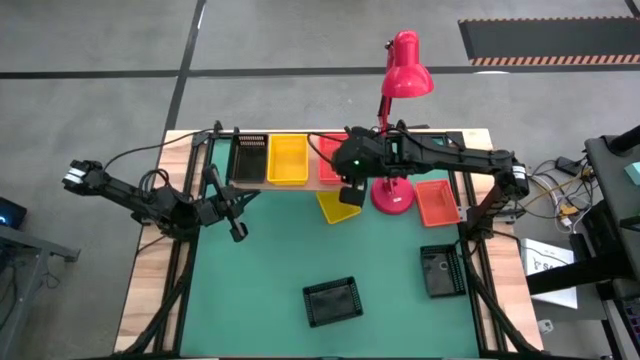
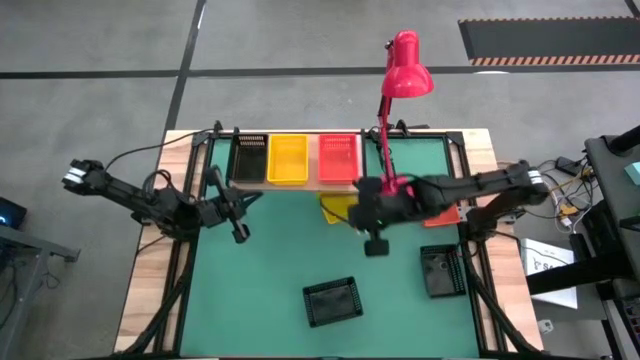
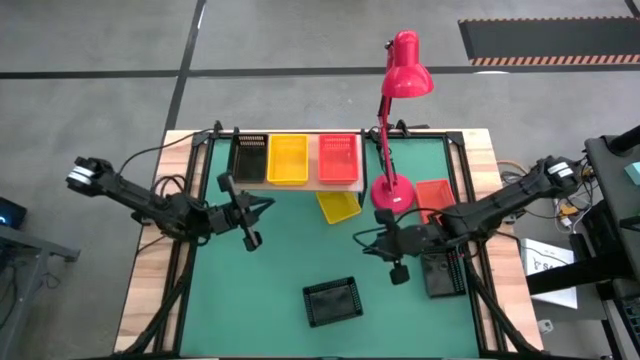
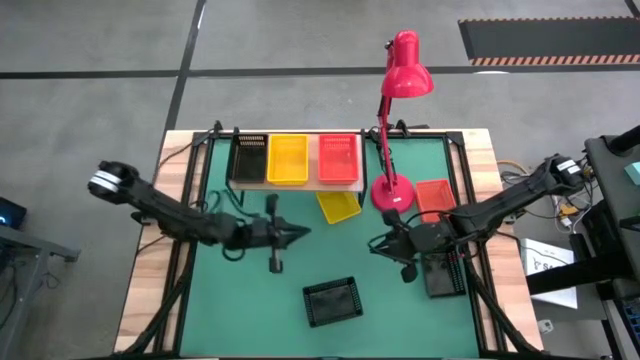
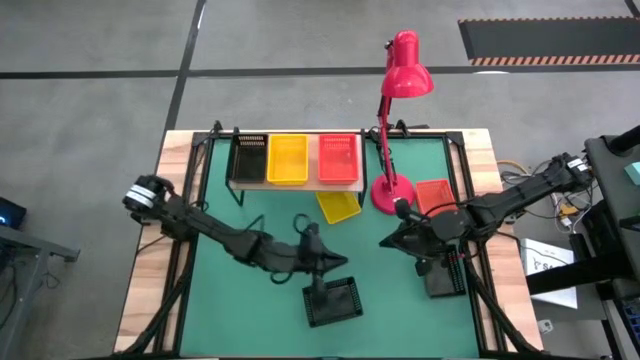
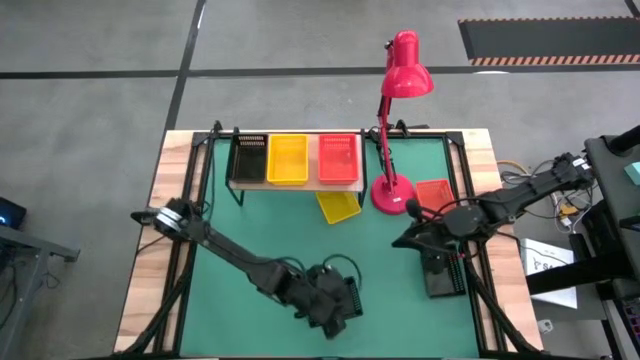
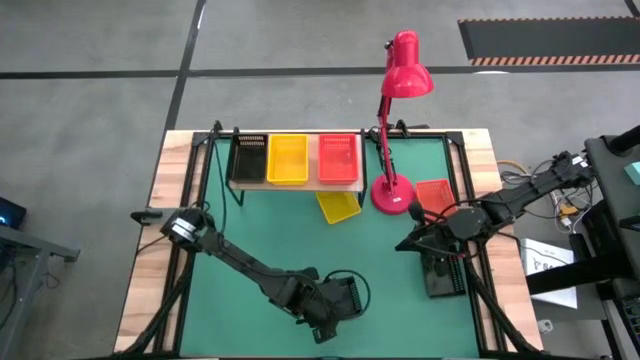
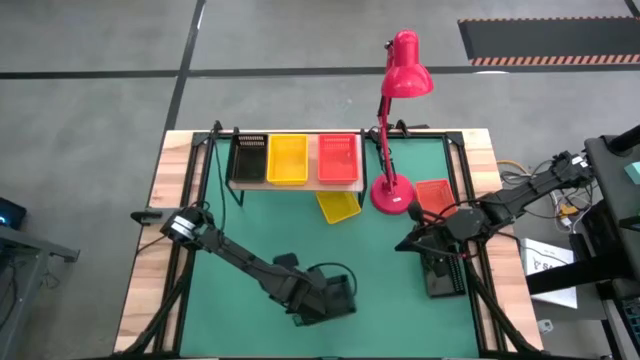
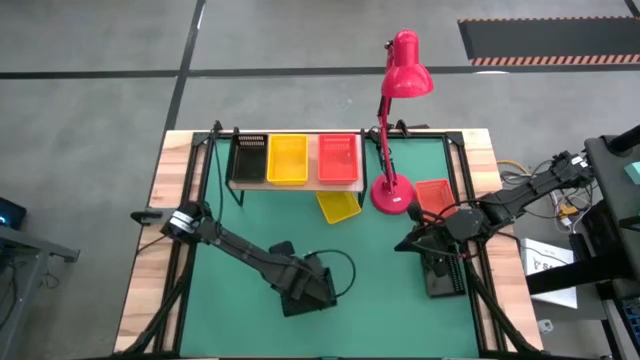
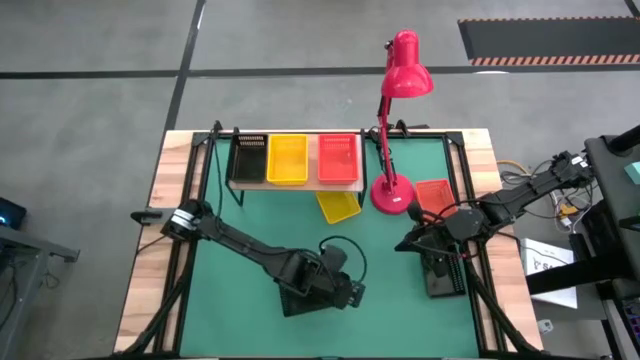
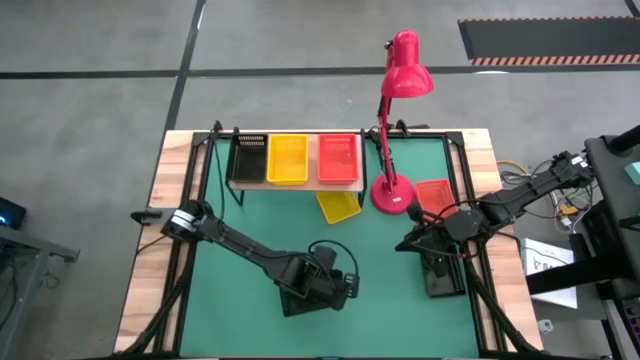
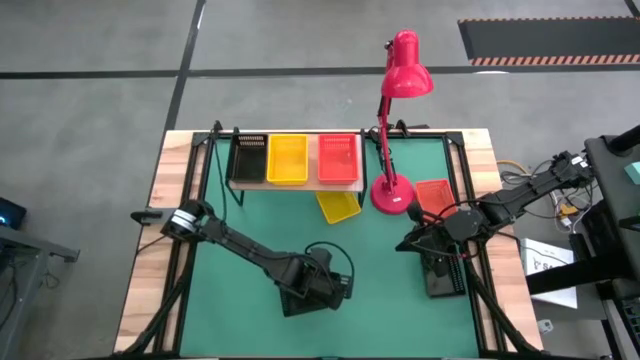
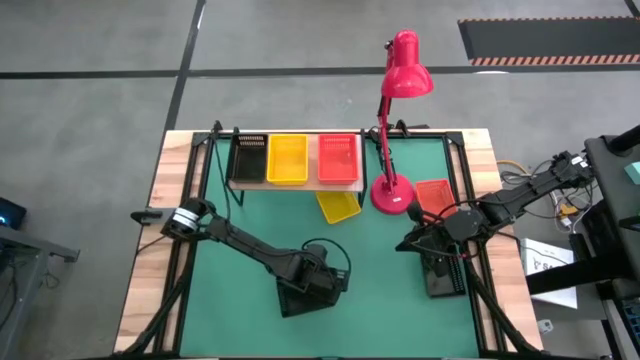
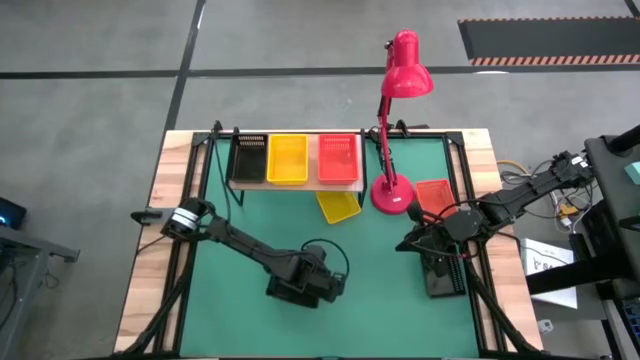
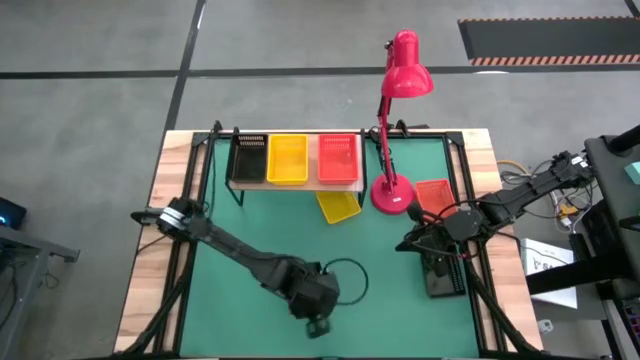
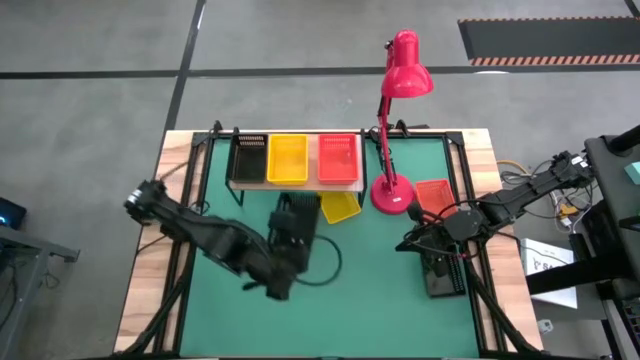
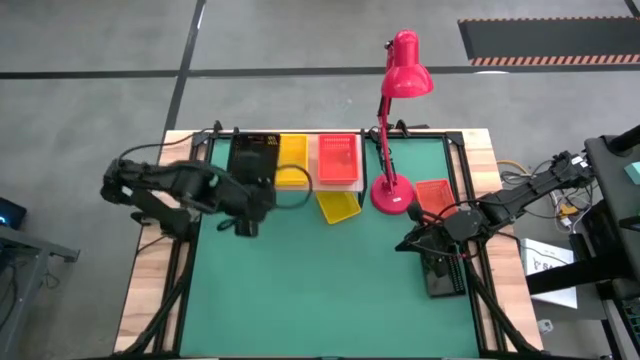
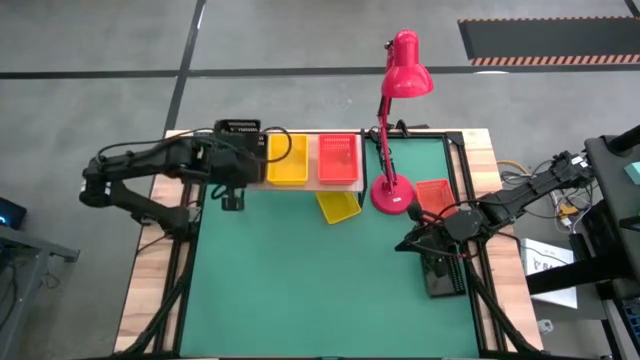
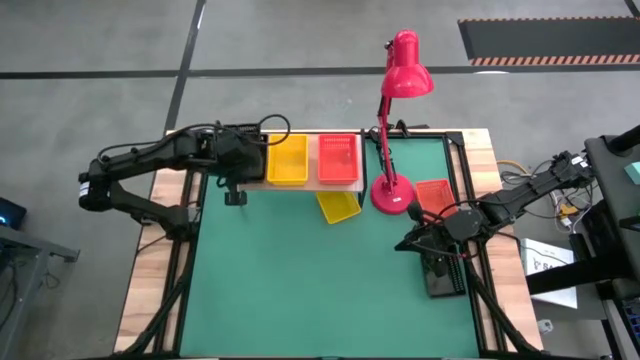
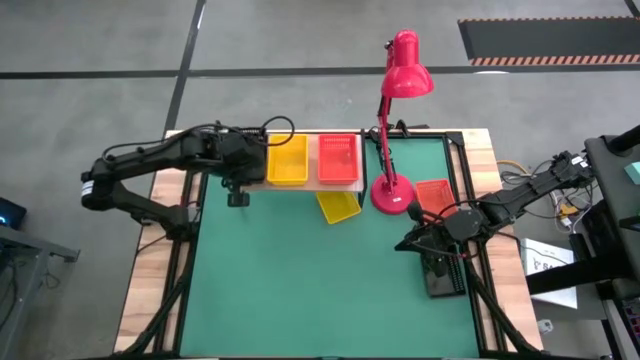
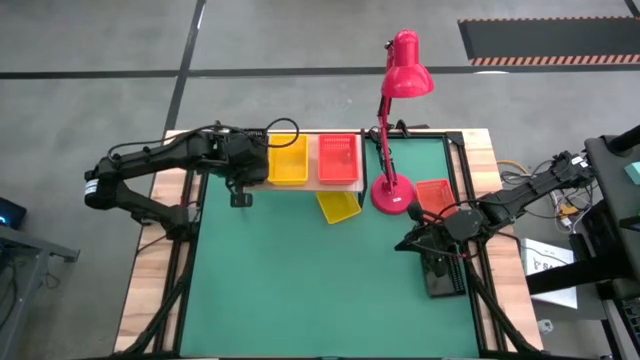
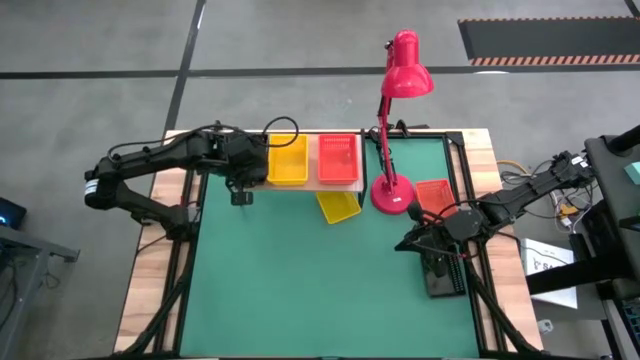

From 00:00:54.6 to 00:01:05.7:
Task: Stack baskets on shelf by color
Stack the bottom black bin on top of the black bin on the shelf

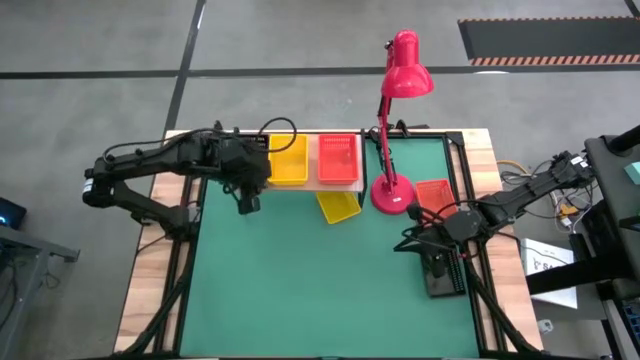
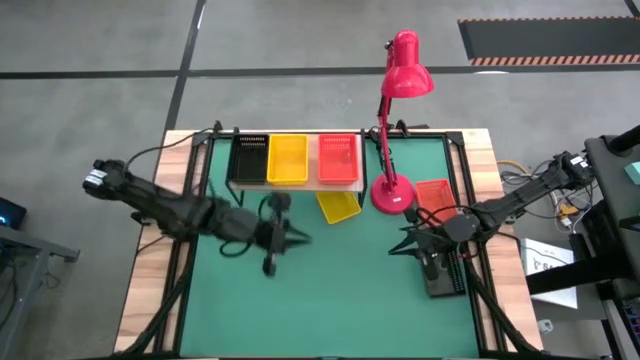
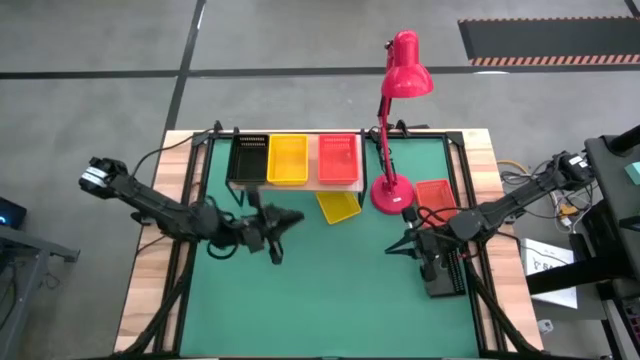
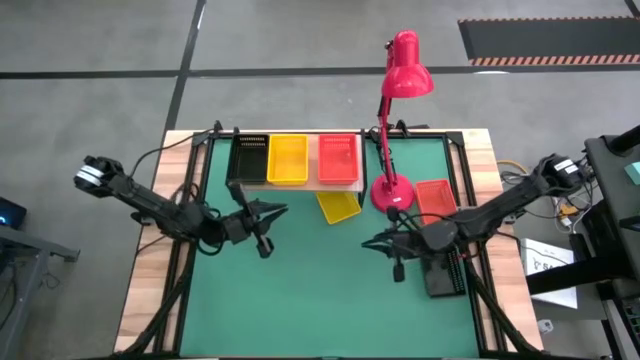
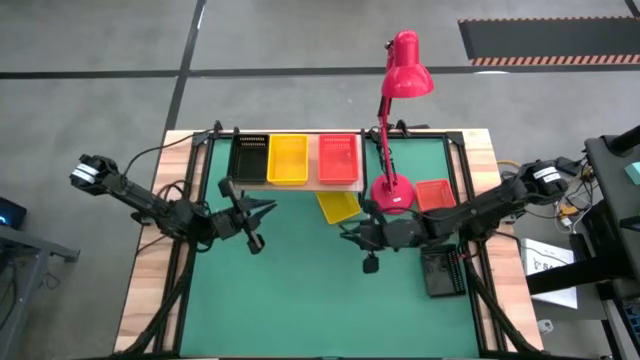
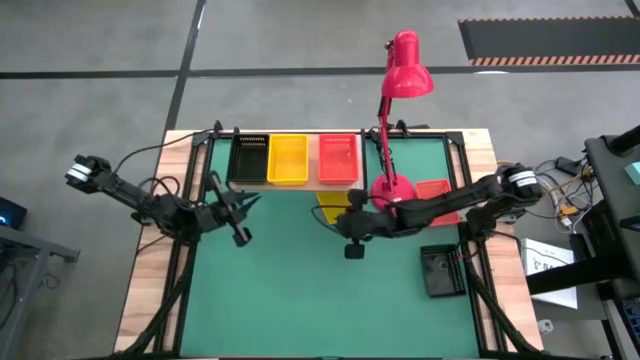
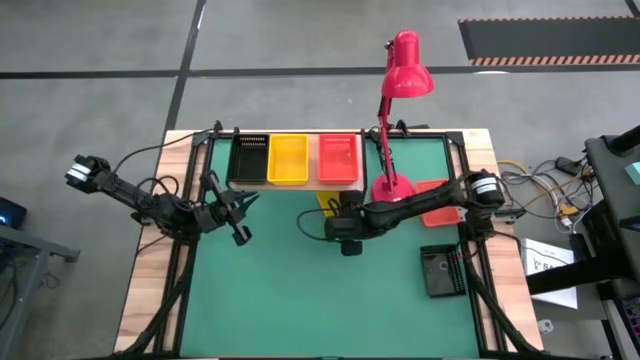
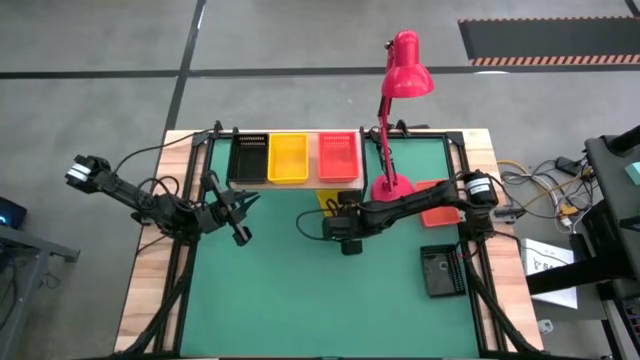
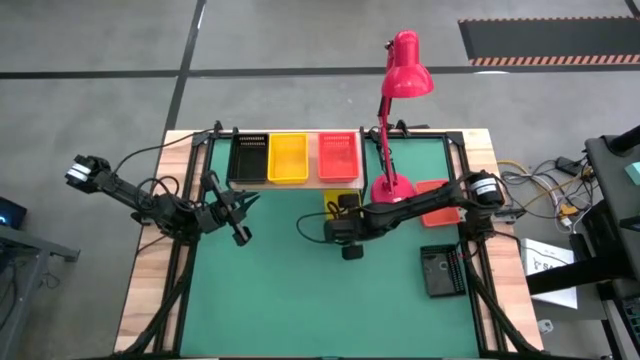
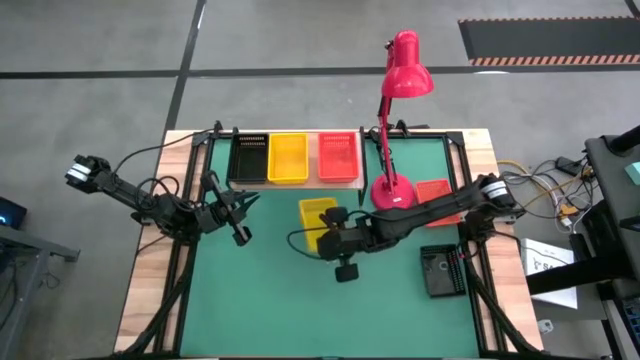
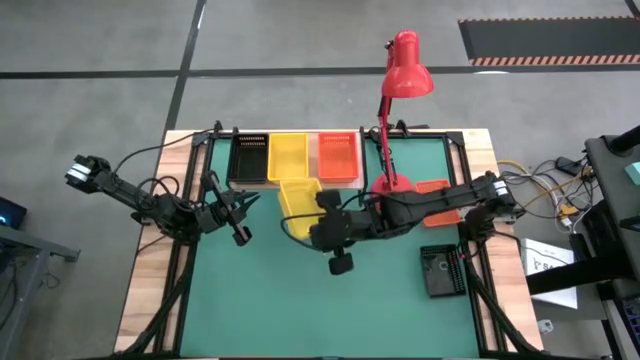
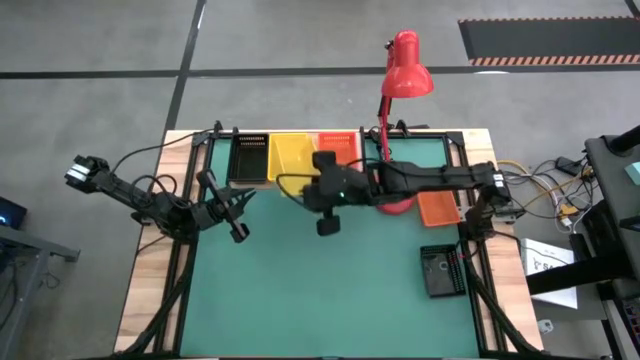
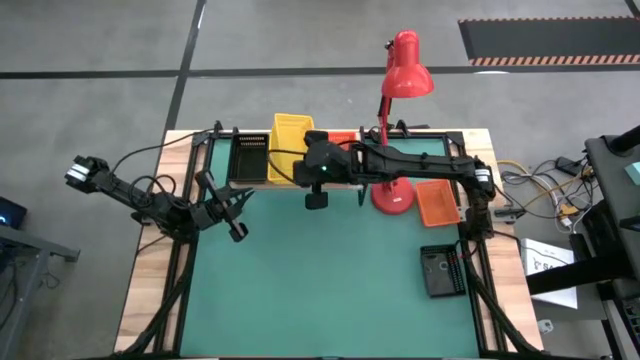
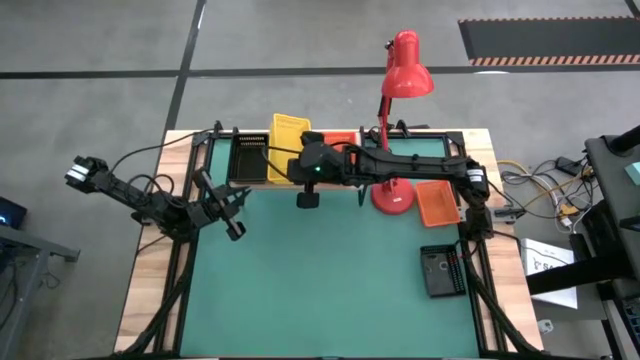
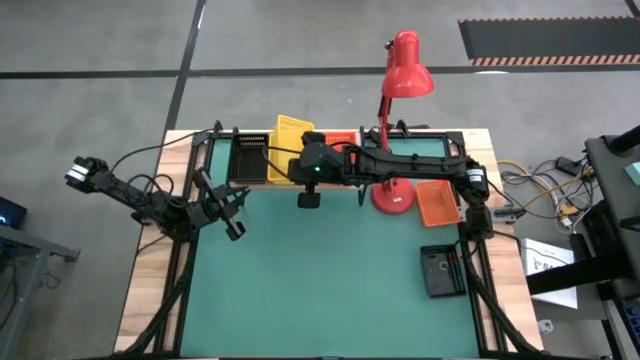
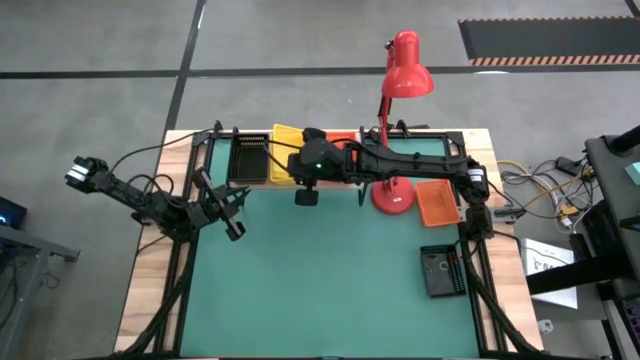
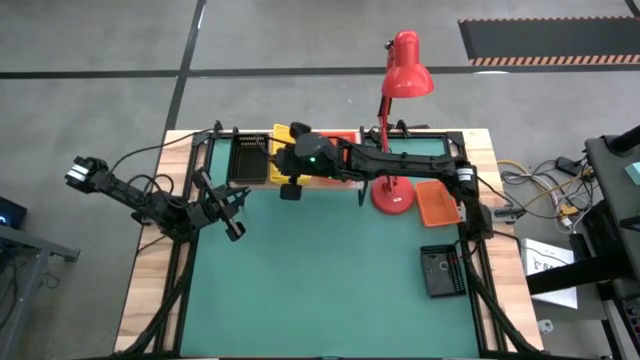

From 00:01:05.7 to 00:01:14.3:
Stack the yellow bin on top of the yellow bins on the shelf

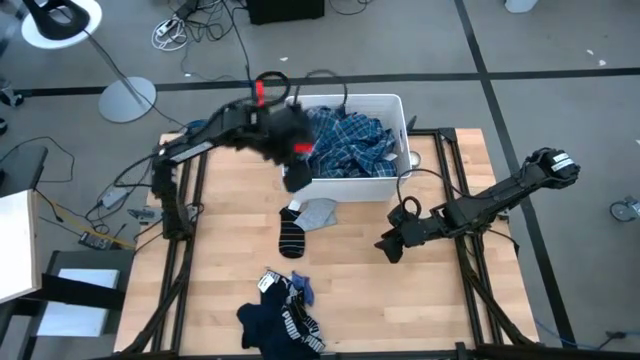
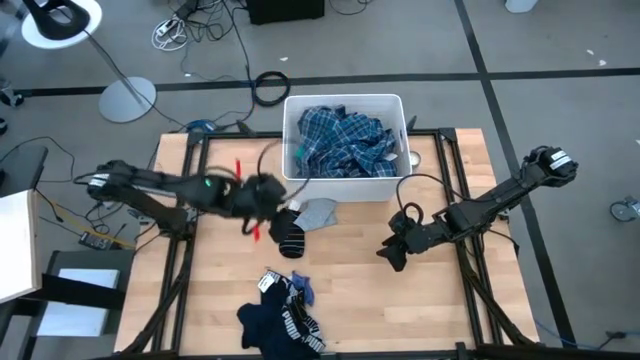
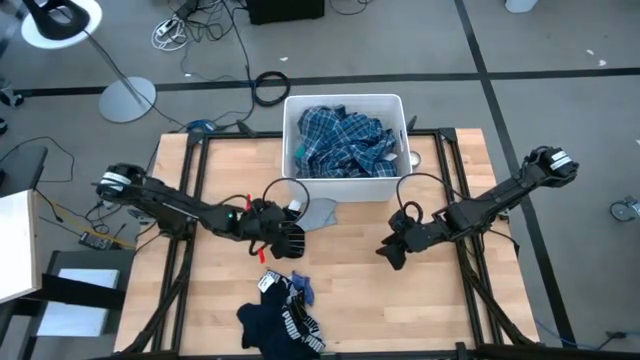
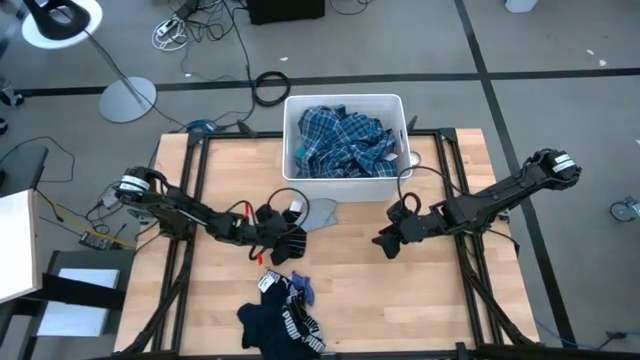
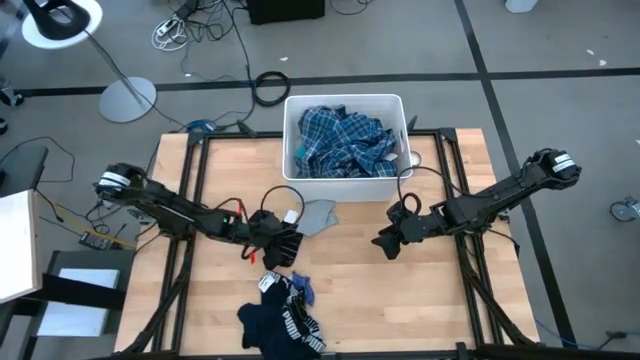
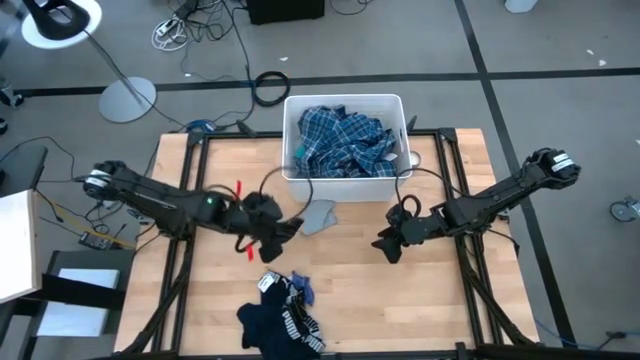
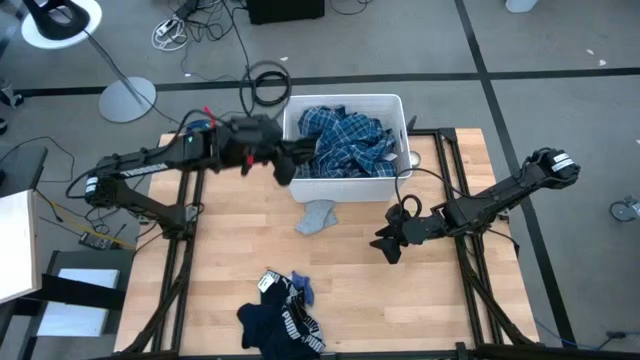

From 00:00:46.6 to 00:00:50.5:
Task: Sort clothes
Put the top black sock into the laundry bin
